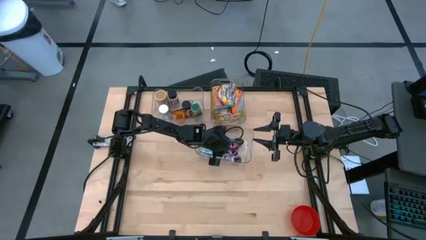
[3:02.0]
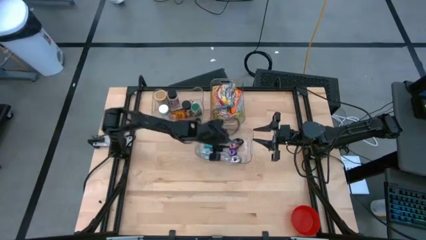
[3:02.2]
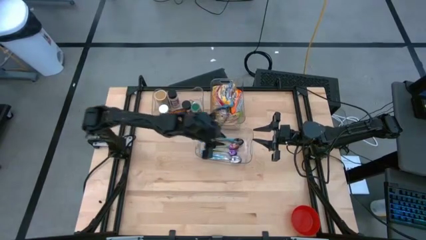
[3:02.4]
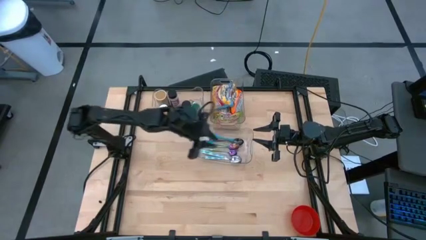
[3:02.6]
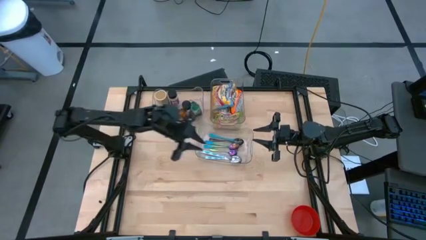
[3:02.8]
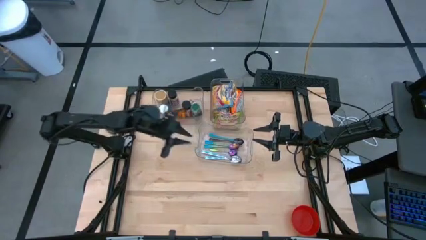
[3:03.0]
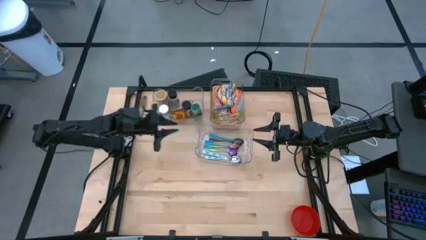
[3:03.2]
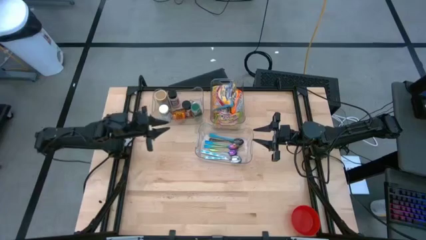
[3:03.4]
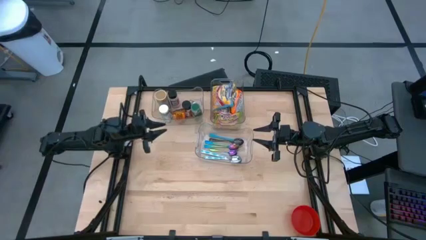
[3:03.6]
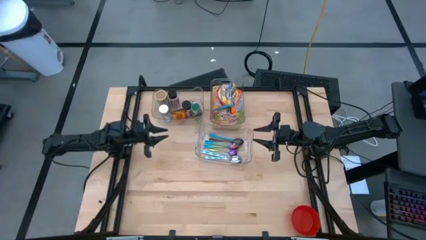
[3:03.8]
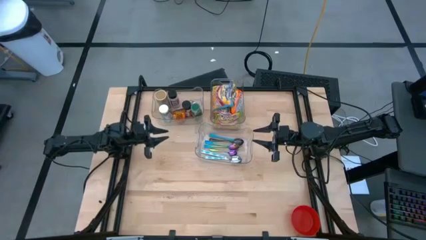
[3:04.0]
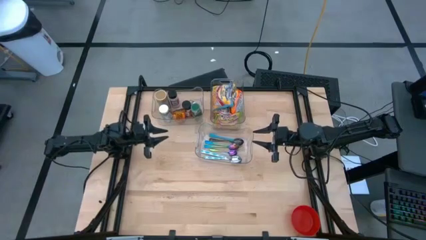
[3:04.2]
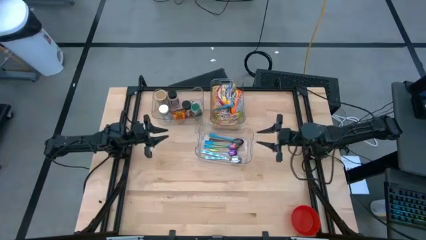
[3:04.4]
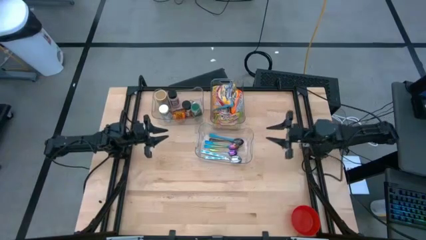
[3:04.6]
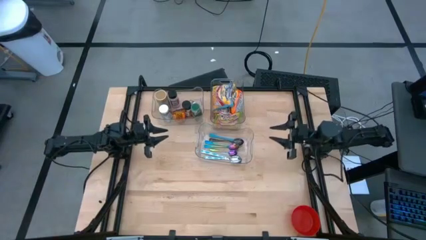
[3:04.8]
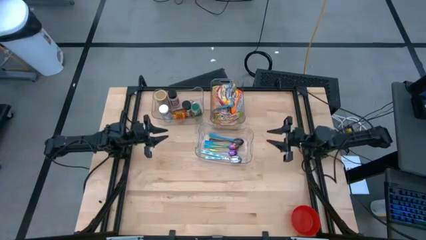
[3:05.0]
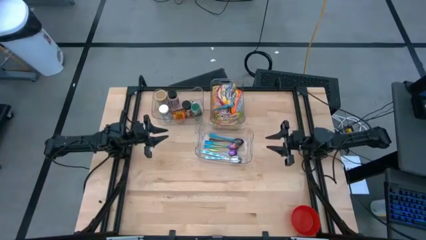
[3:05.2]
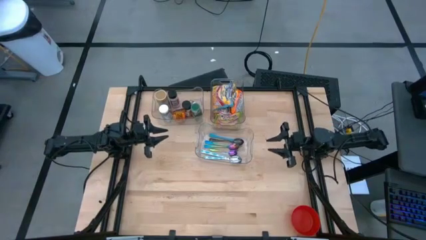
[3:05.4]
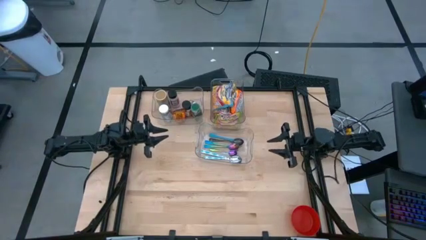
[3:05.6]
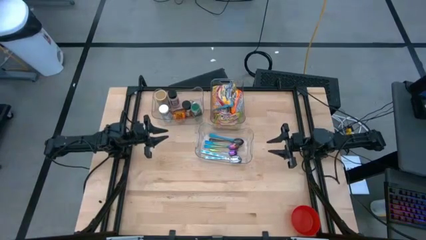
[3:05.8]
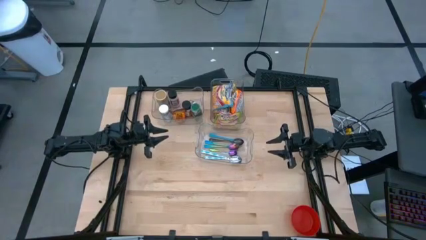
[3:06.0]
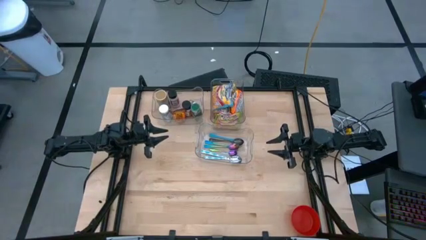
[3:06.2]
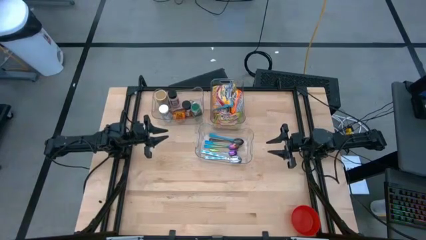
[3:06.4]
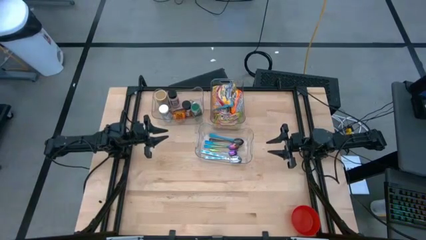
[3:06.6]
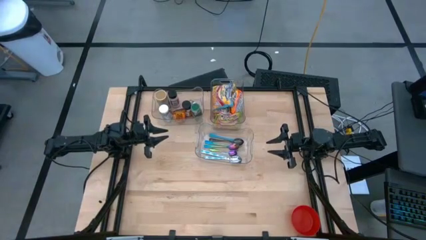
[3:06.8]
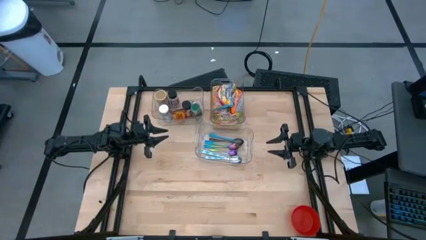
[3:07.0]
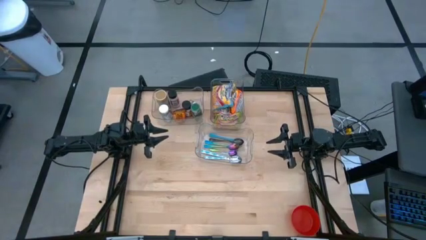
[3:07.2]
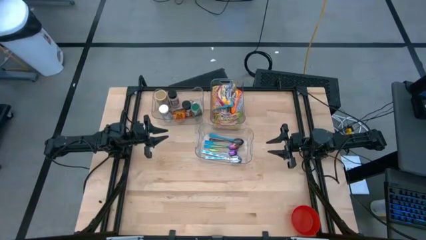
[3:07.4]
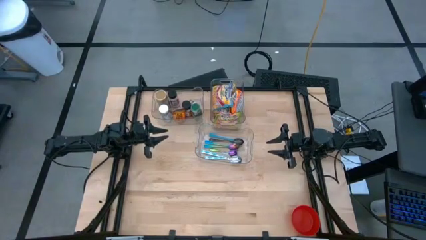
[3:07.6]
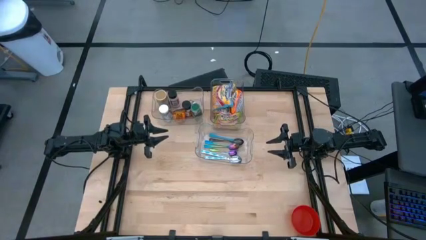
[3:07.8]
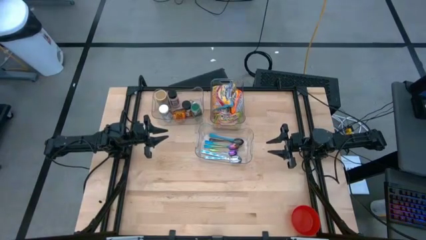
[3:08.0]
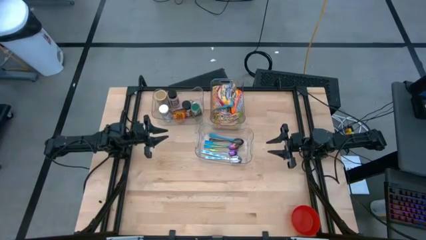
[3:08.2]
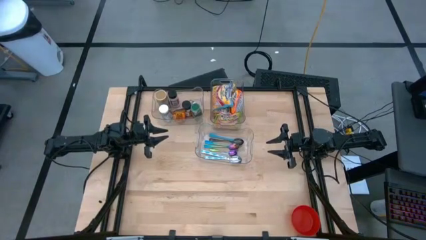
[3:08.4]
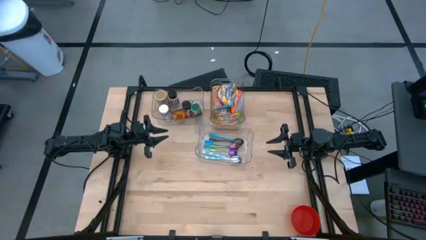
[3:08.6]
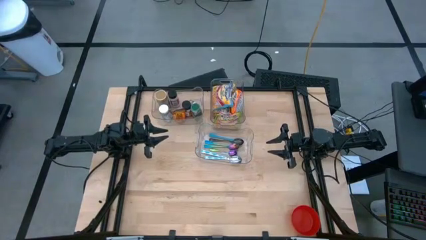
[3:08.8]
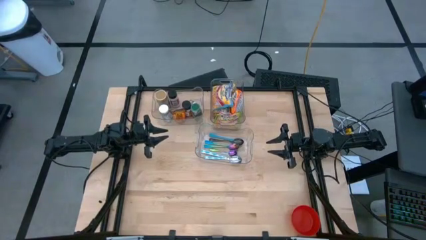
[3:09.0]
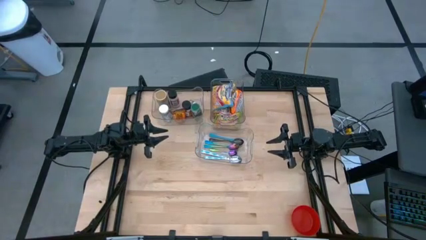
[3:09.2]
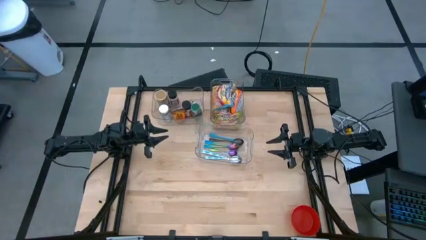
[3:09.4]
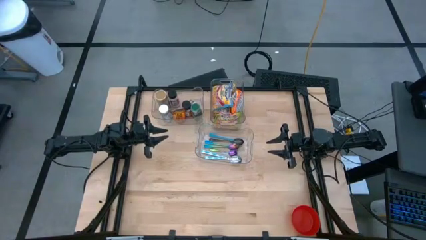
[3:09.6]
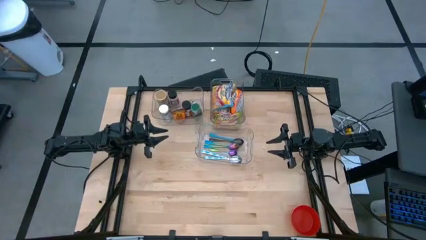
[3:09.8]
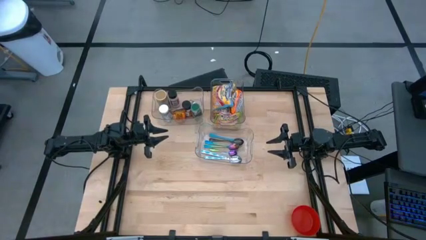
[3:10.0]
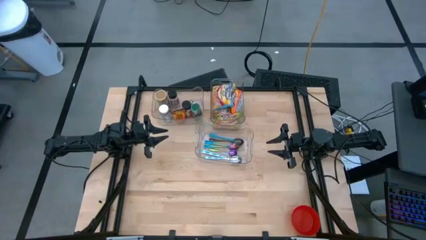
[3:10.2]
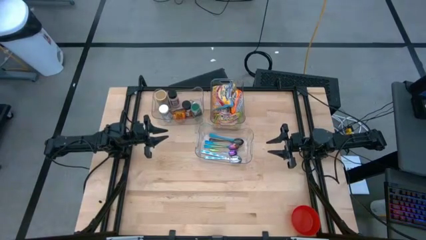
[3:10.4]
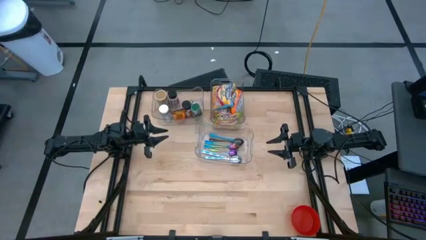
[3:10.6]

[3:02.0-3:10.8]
Task: Pick & Place Food Item
Return to Home Position

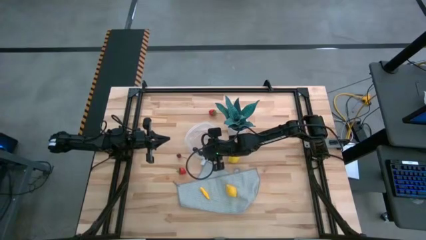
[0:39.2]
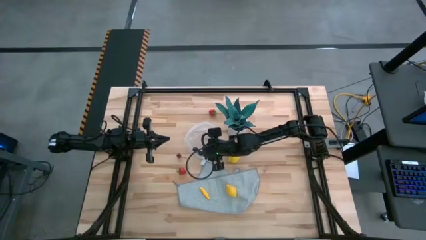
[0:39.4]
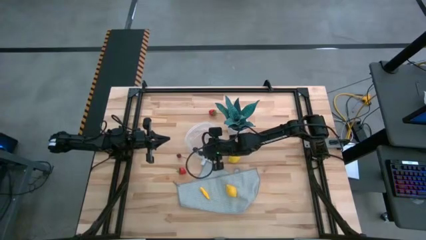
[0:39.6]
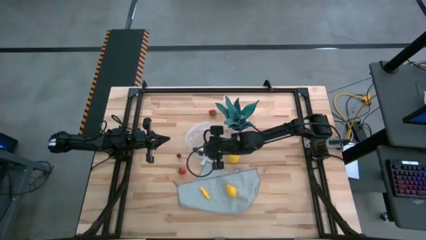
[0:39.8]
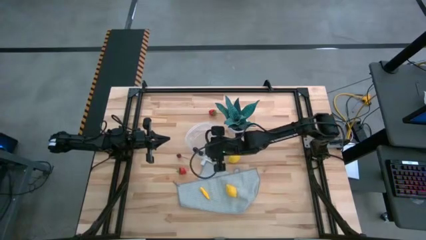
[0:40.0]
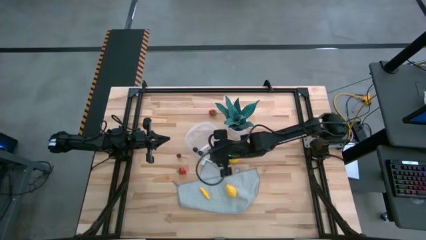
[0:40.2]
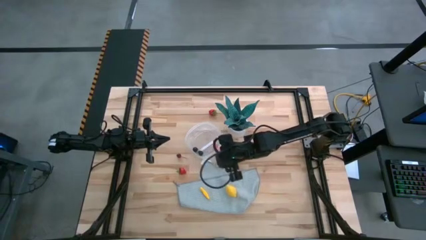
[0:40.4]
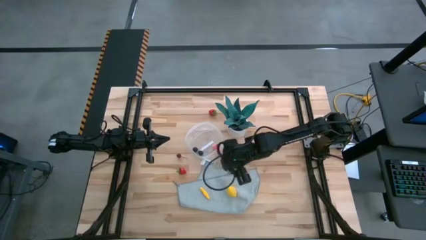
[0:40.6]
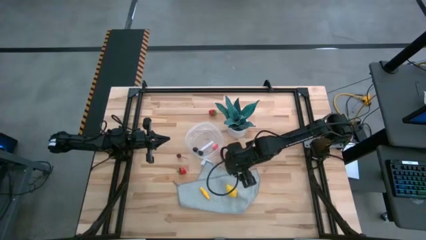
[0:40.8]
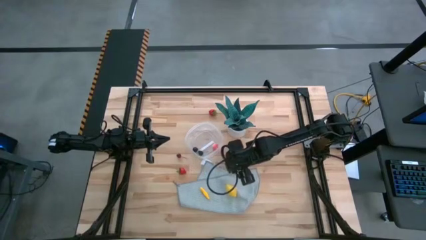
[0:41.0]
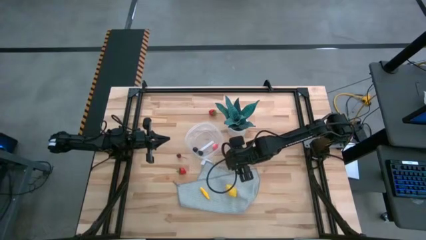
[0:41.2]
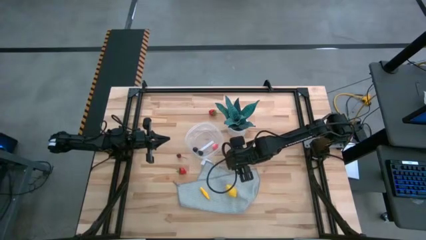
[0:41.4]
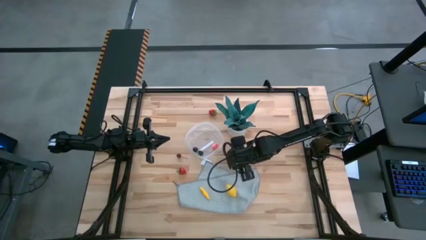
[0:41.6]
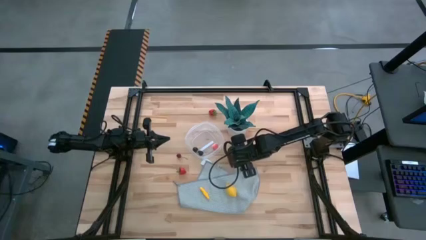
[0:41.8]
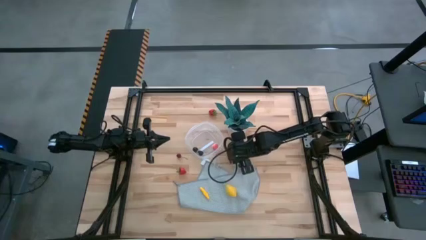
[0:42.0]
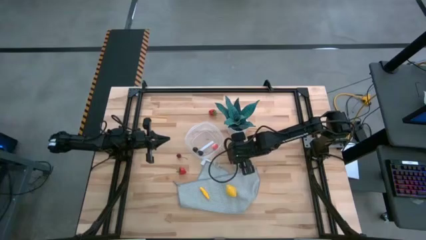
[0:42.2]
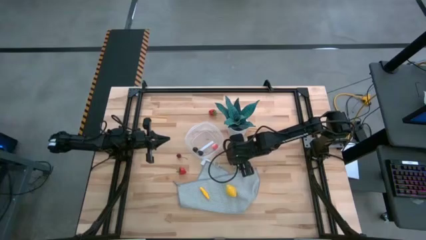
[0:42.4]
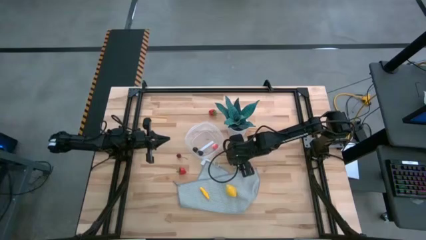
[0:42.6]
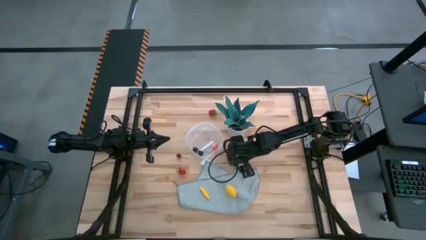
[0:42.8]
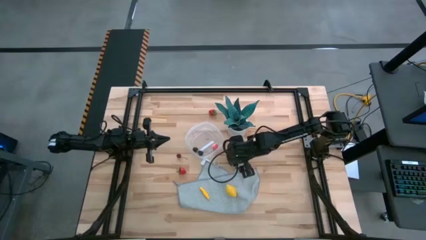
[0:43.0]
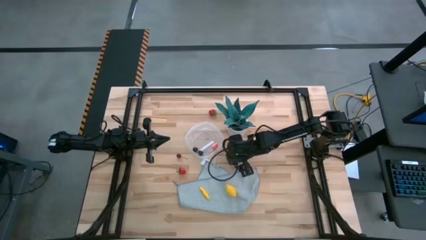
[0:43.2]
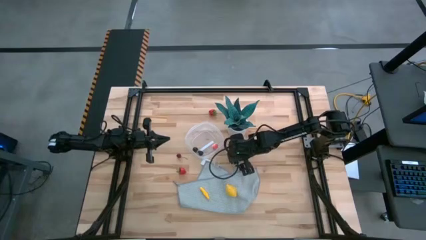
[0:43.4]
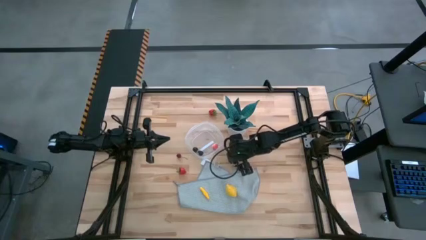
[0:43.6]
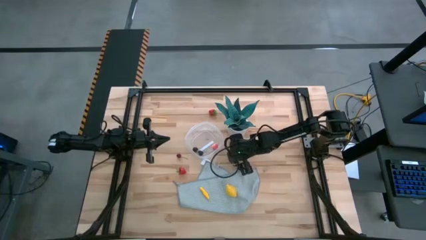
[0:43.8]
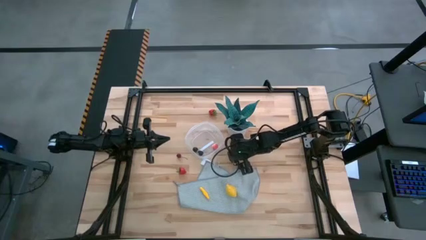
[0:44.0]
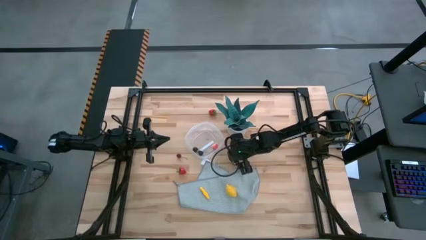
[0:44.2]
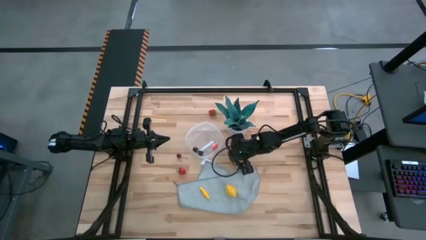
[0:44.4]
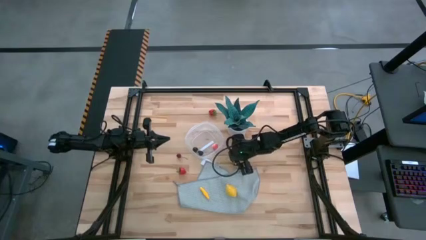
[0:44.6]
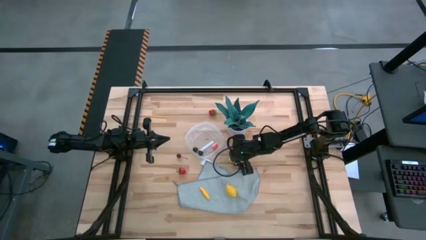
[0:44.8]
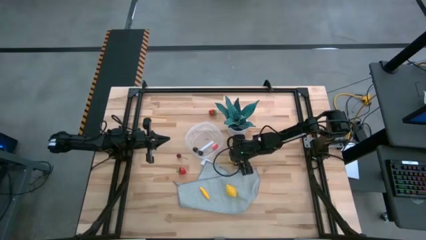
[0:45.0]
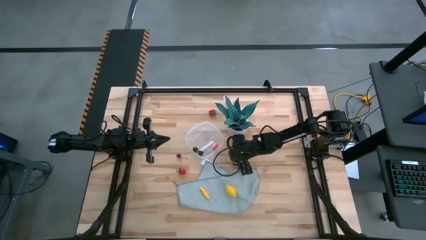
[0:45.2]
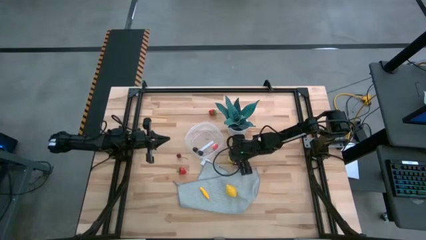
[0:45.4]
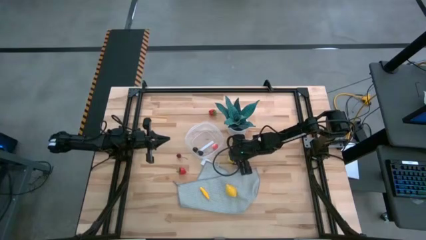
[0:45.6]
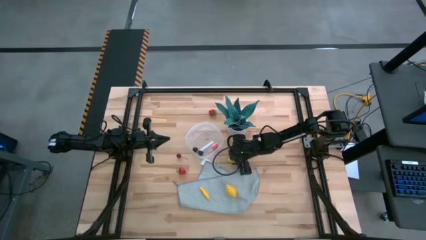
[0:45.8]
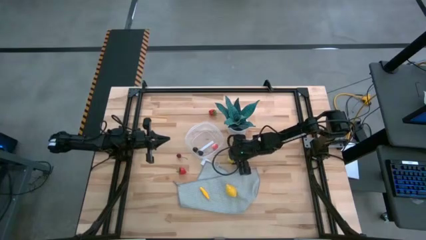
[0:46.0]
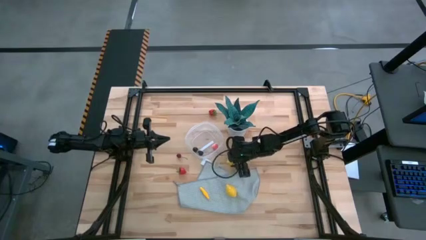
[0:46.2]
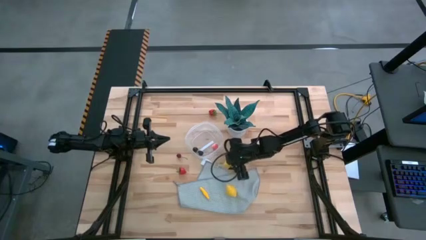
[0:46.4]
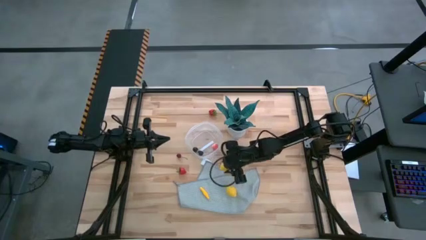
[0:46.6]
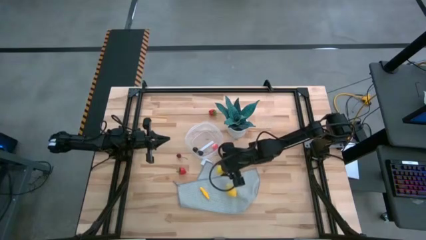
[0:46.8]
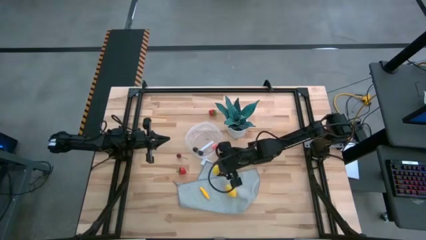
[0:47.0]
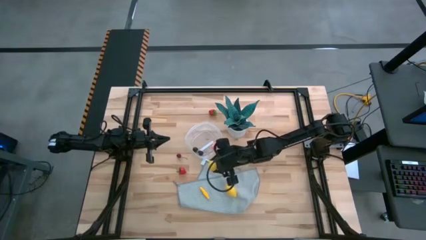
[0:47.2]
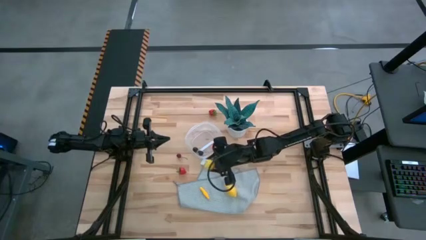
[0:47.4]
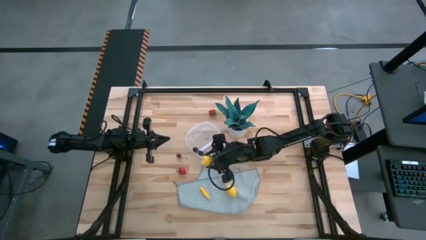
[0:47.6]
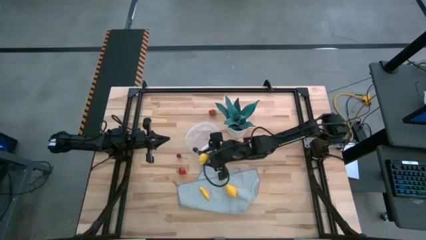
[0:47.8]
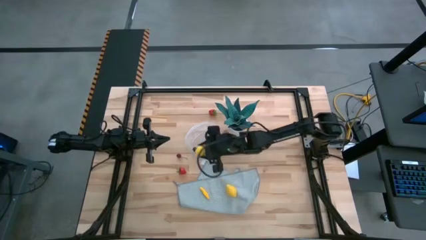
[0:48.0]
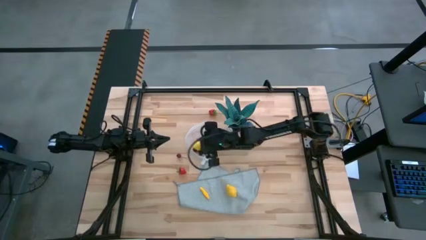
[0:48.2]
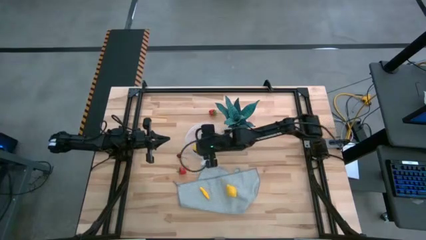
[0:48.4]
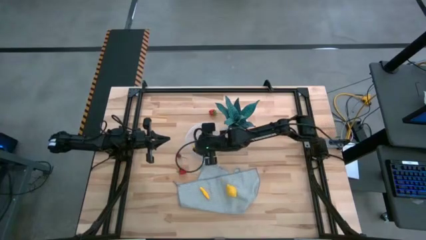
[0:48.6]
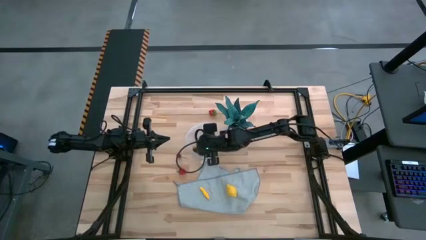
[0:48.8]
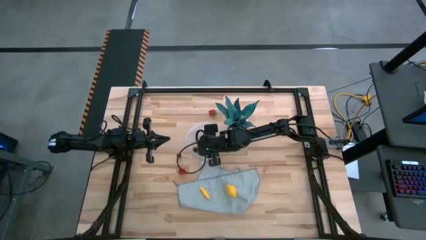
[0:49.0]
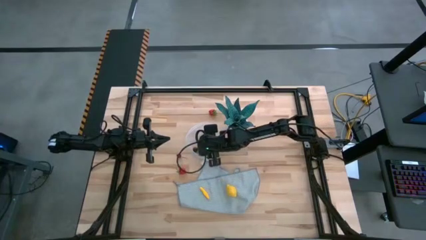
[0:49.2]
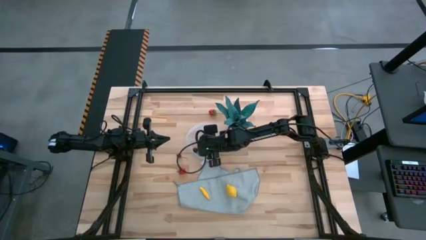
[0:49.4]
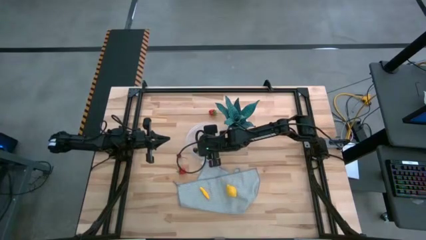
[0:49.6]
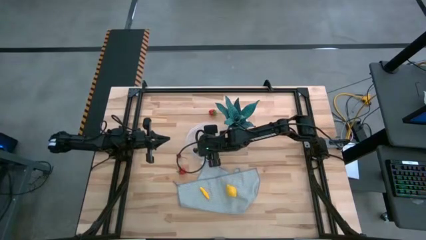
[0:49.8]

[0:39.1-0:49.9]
Task: Pick and placing Produce into tupperware
Put the top yellow lemon into the container
